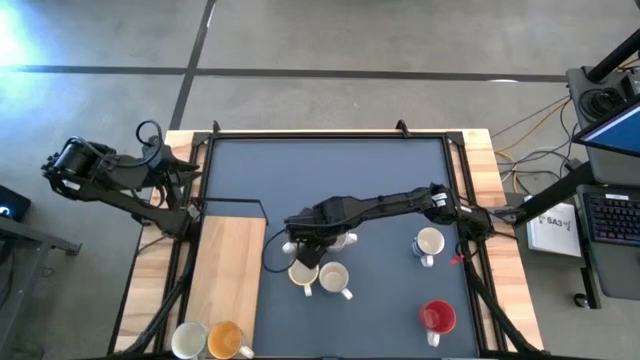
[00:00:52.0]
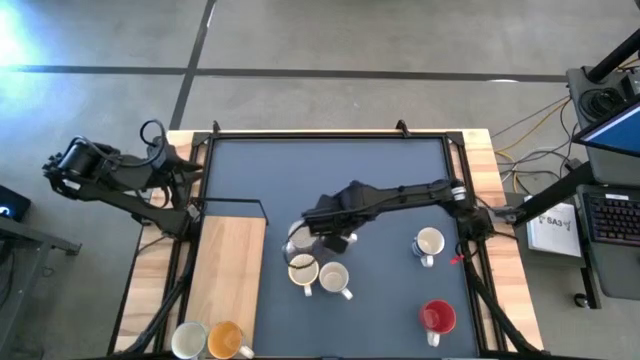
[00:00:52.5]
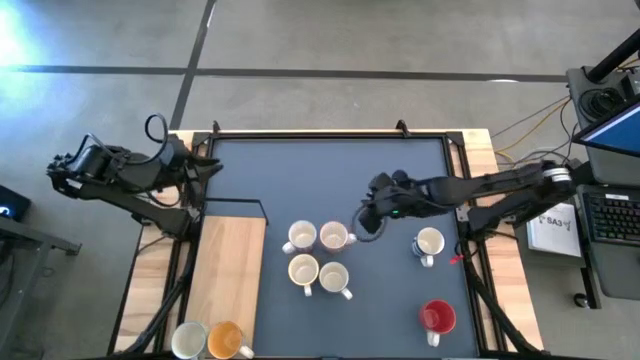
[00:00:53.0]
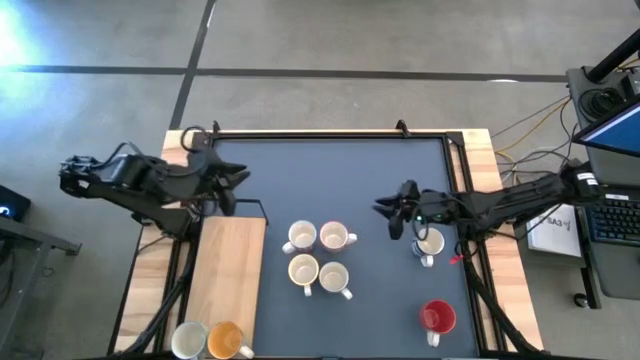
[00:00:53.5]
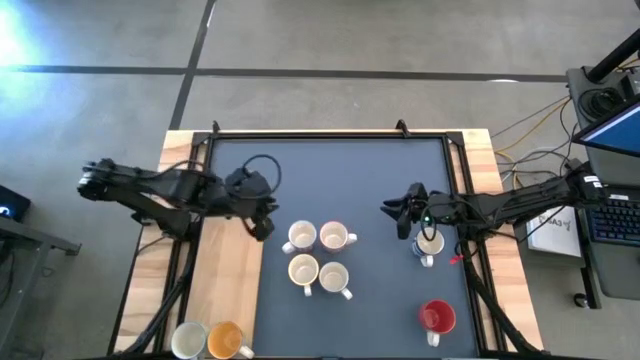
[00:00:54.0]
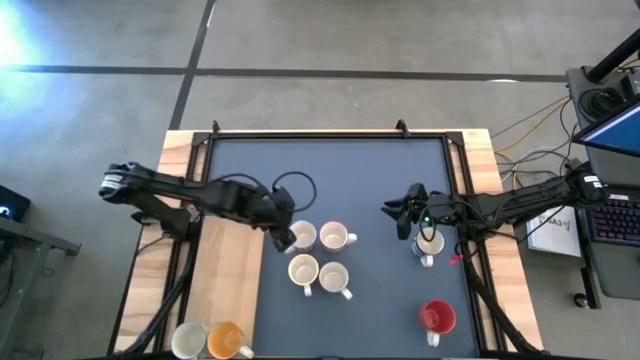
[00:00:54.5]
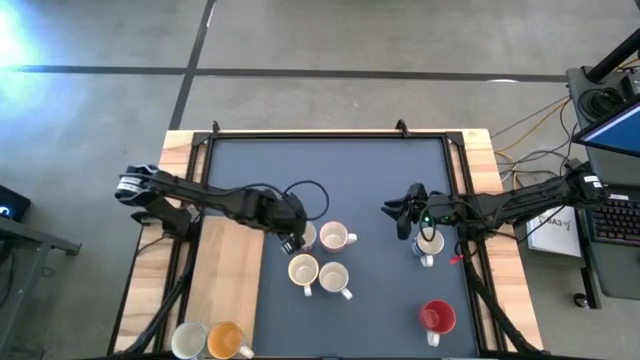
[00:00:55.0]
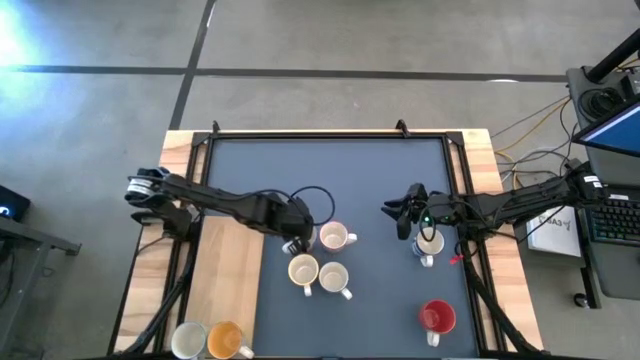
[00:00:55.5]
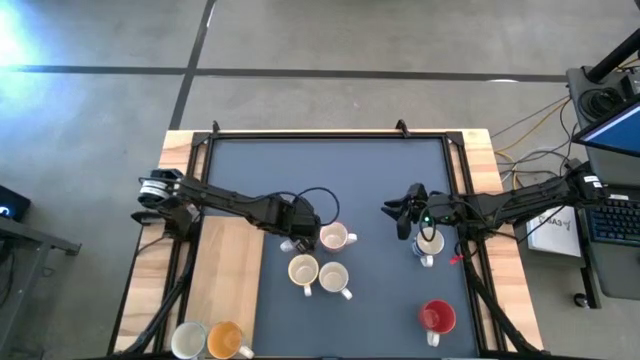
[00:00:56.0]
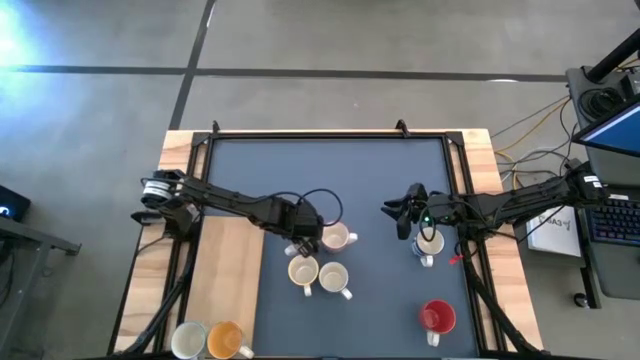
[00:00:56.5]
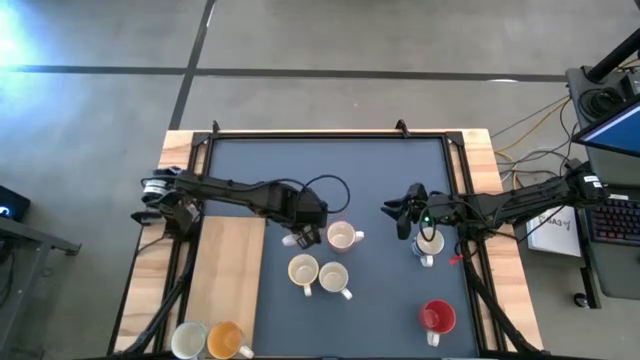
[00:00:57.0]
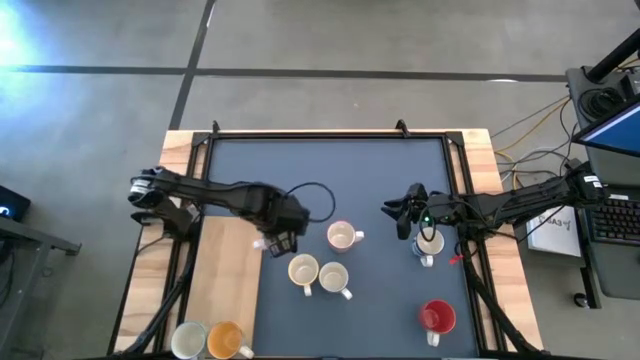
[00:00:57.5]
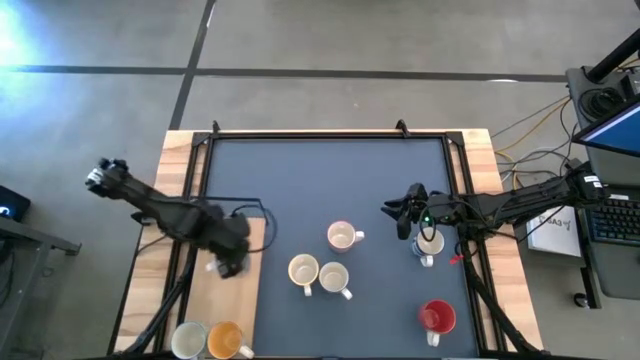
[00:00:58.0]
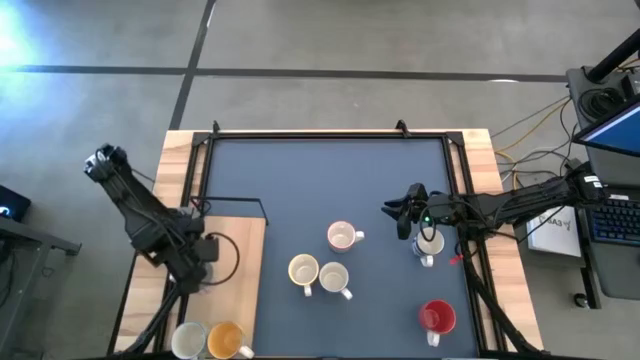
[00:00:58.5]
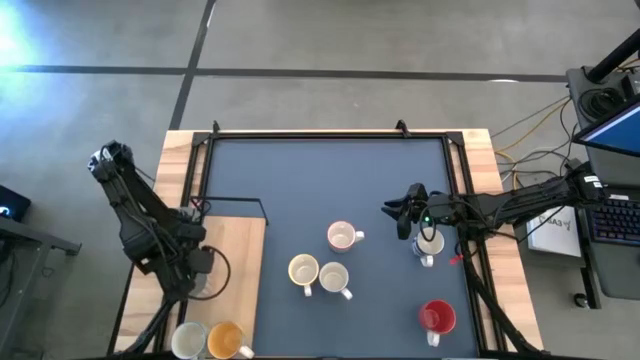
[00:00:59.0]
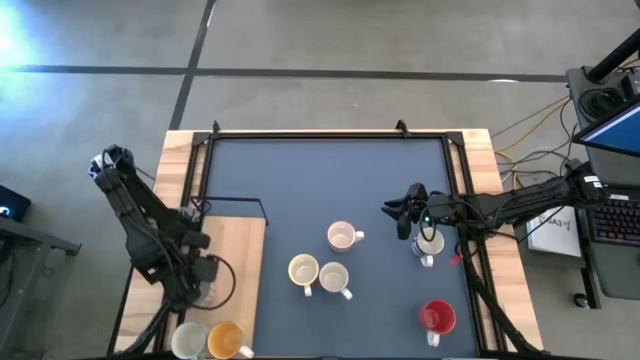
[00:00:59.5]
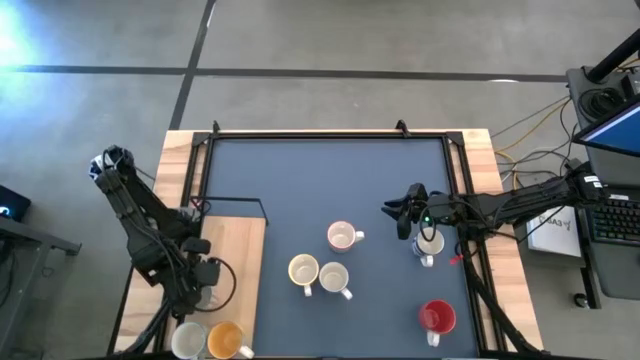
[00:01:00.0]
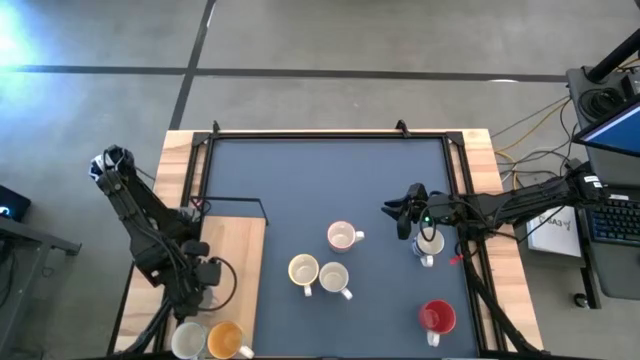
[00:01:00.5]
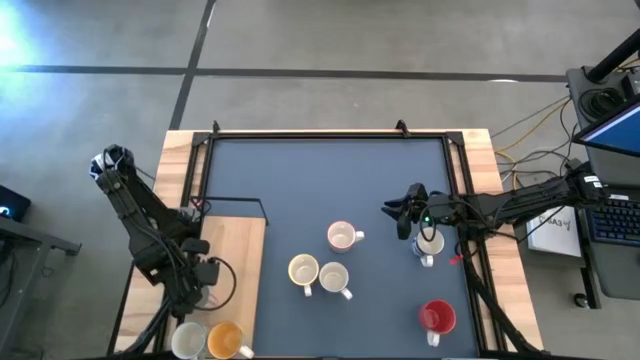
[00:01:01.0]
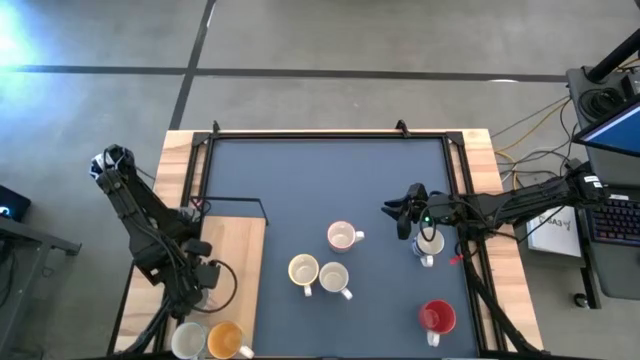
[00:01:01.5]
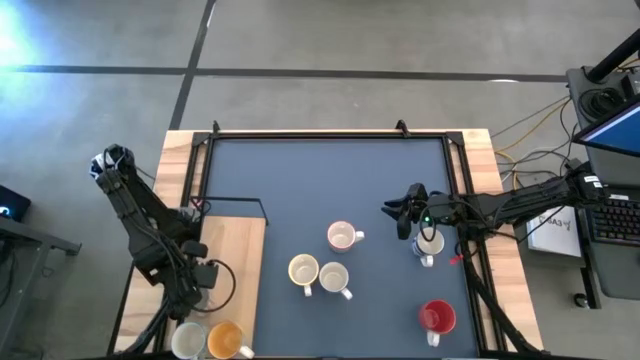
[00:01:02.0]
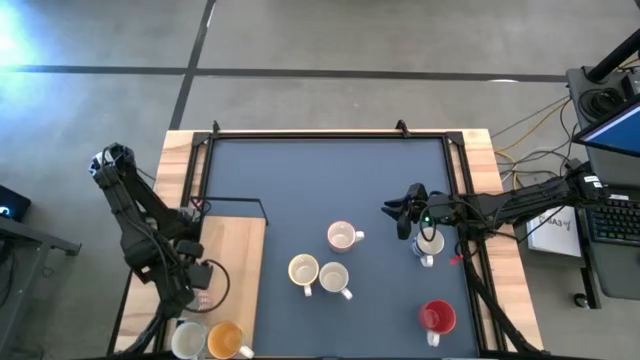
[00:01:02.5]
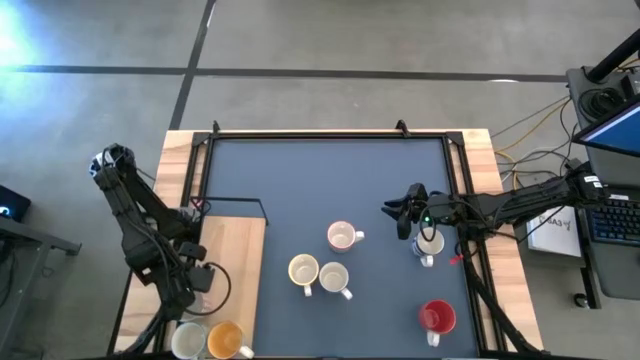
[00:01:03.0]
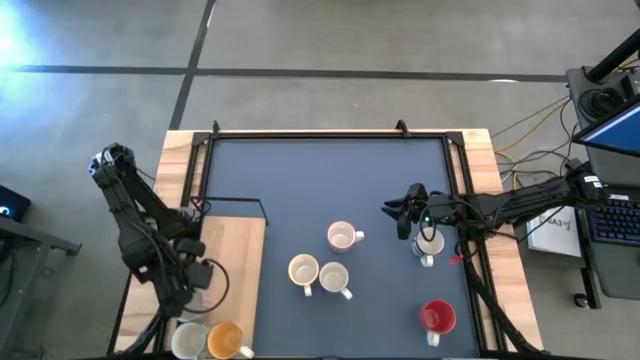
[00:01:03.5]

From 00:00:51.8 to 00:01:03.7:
Task: Place coffee mugs
Put the patterned red mug on the shelf

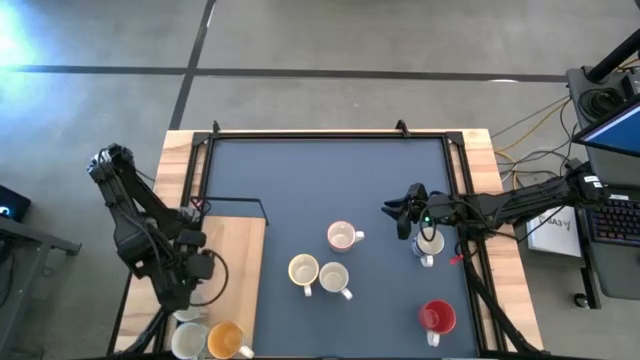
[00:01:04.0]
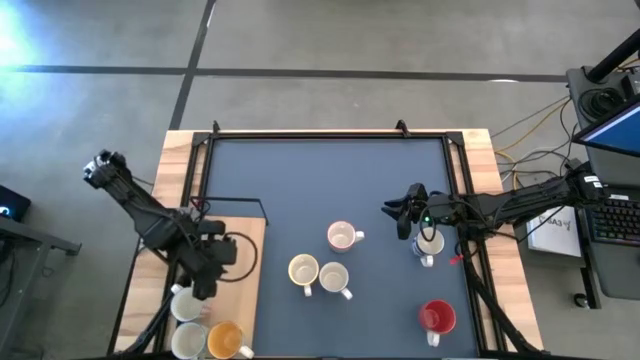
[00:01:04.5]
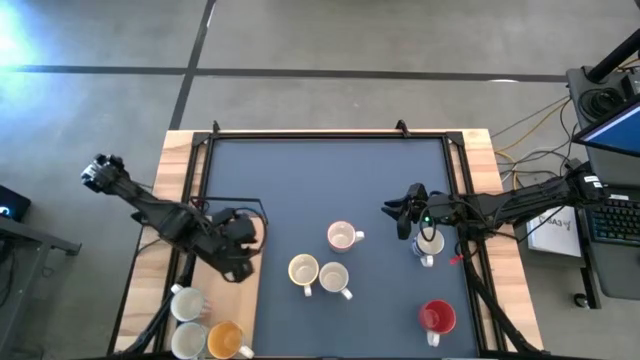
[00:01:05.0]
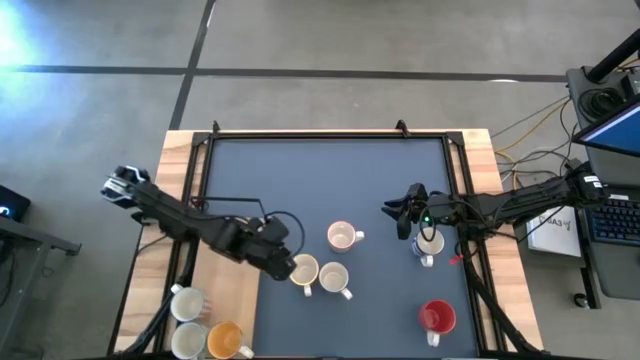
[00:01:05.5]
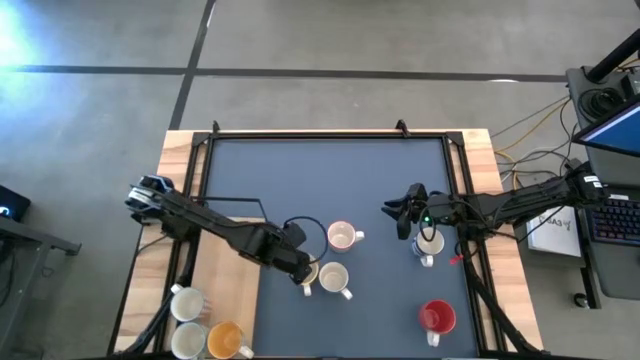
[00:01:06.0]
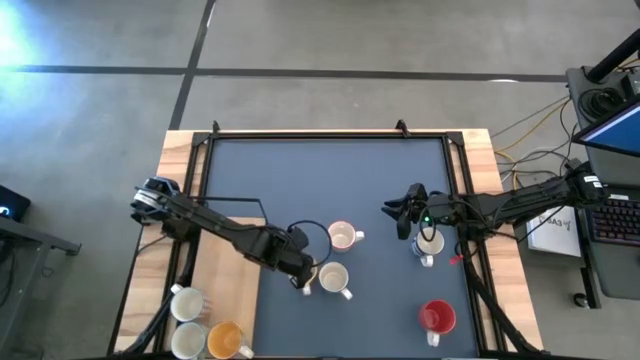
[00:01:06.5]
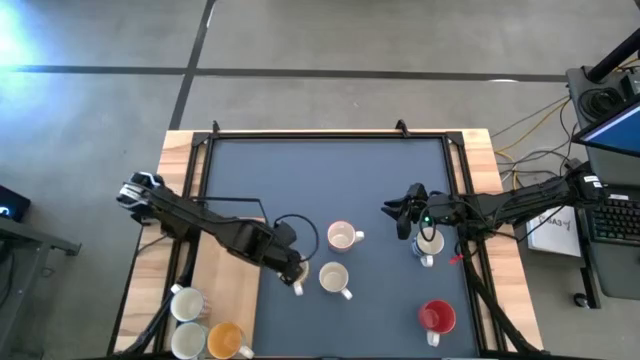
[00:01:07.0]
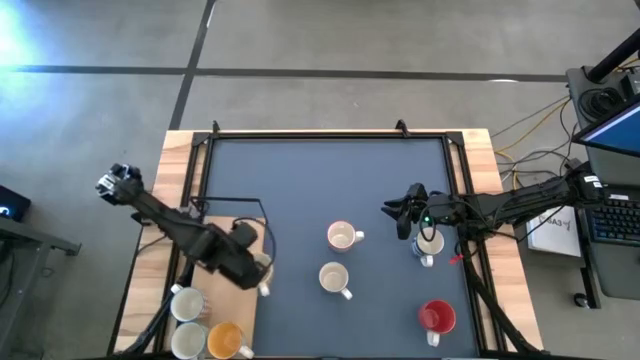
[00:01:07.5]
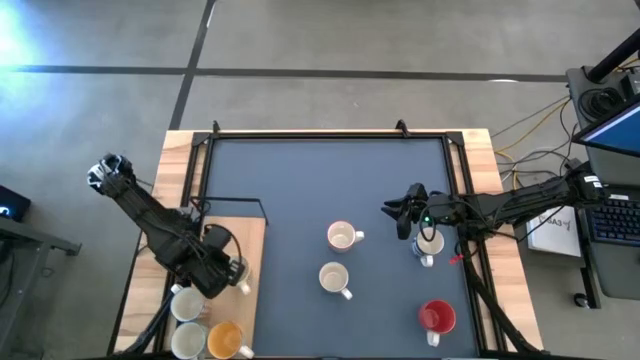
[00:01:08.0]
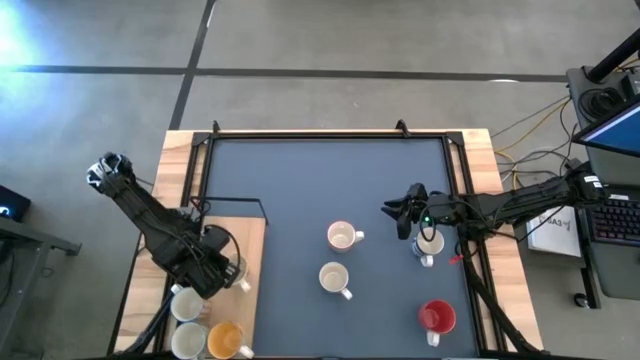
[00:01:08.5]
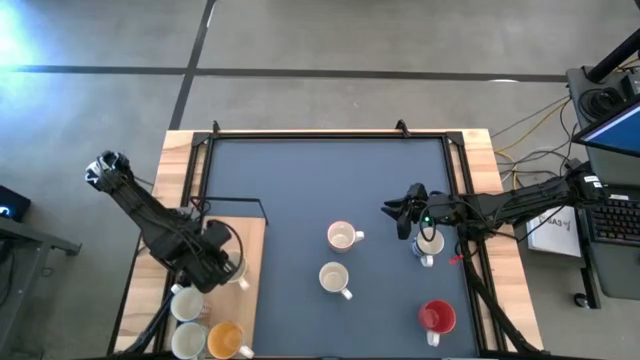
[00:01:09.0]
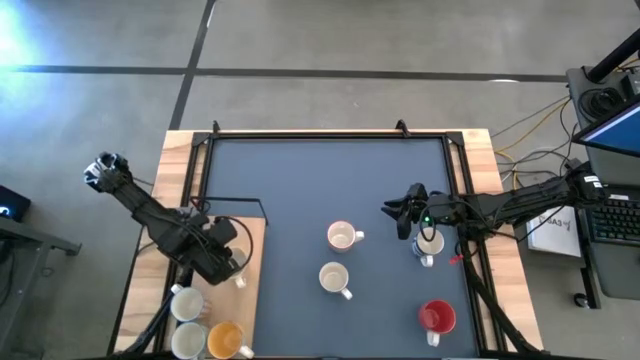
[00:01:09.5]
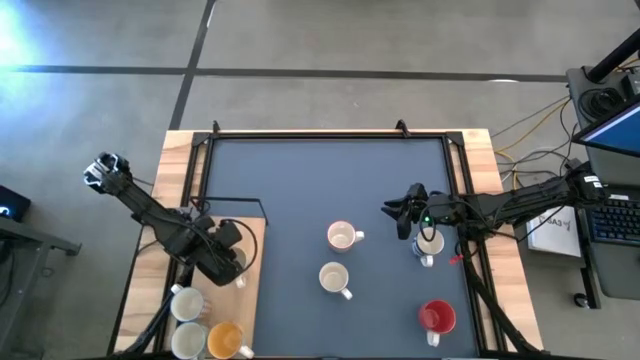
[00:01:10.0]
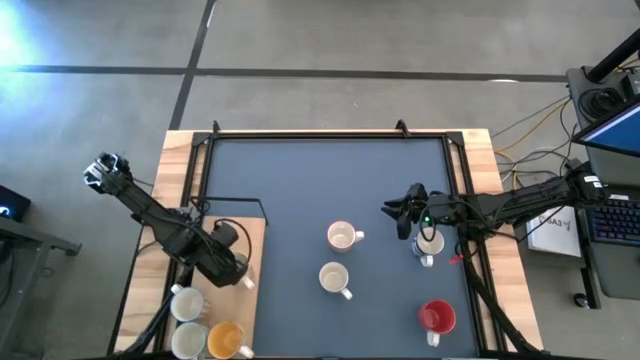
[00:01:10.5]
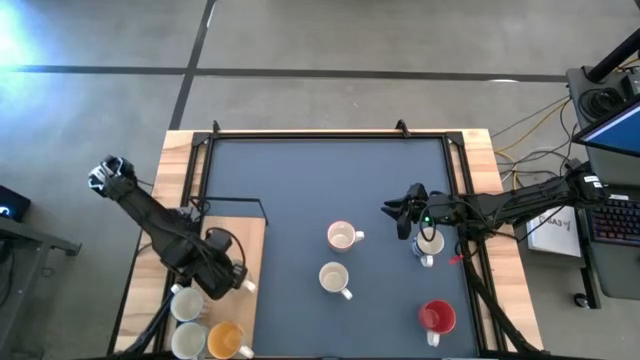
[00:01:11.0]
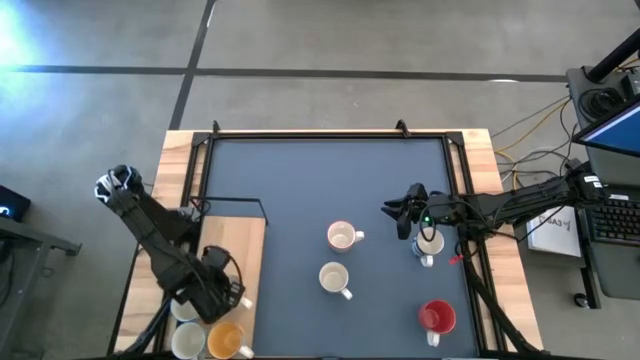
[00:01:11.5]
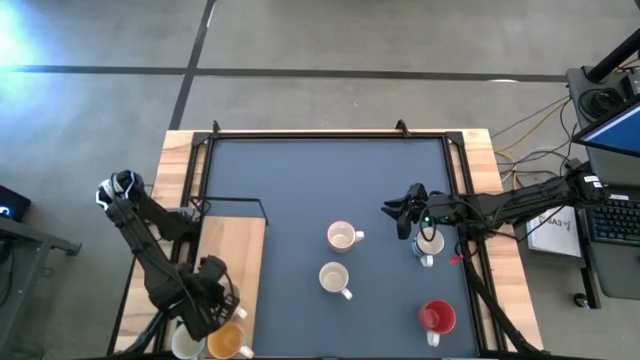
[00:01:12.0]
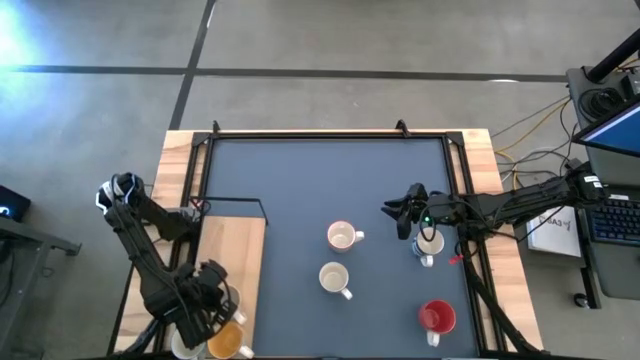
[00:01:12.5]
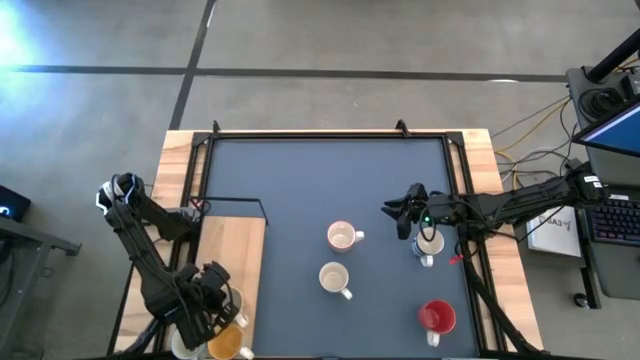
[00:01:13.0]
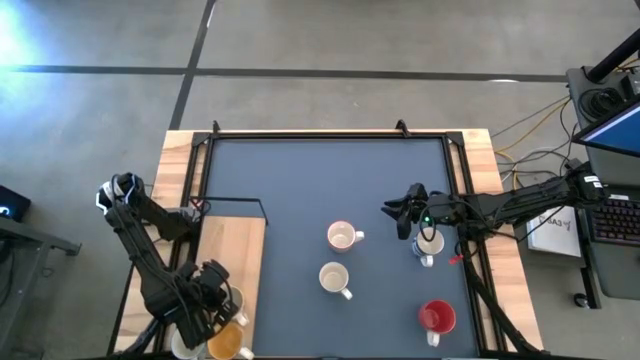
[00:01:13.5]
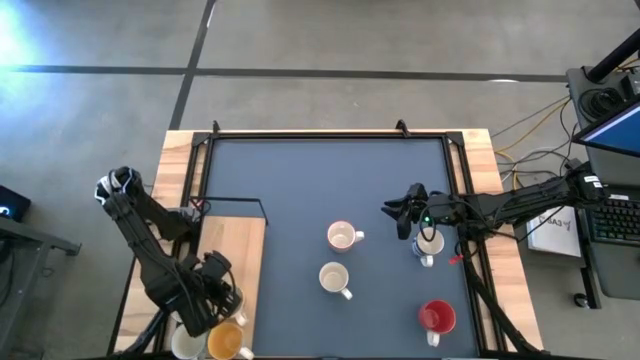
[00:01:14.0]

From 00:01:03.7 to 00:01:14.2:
Put the patterned brown mug on the shelf
